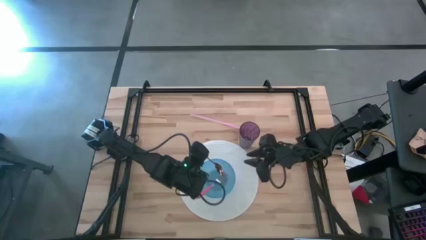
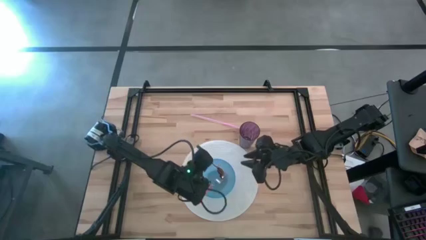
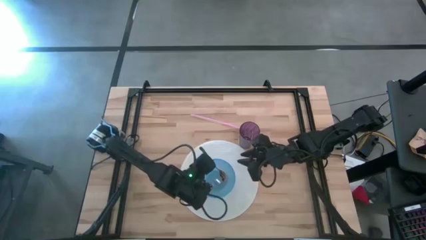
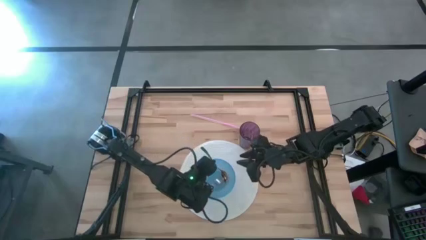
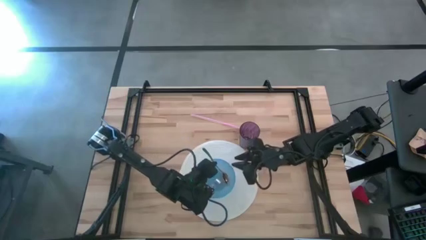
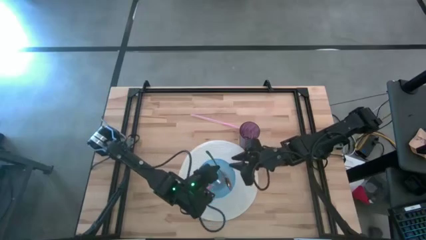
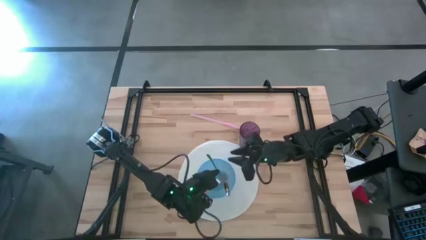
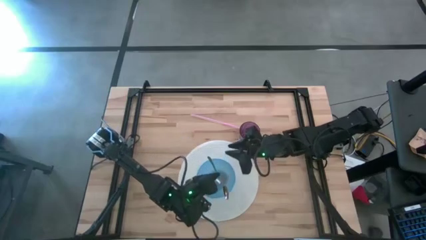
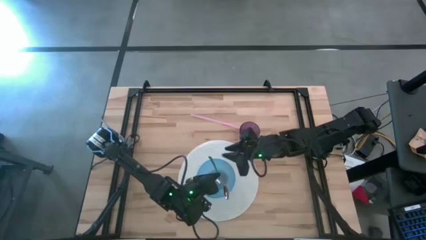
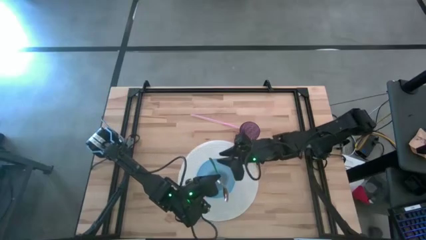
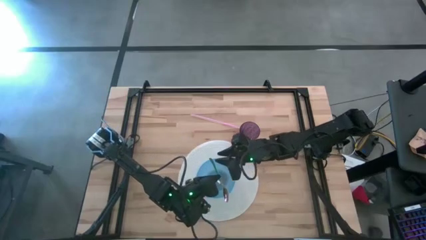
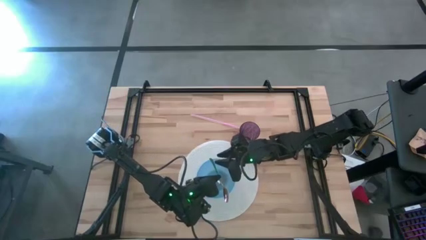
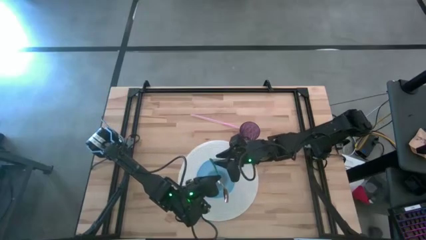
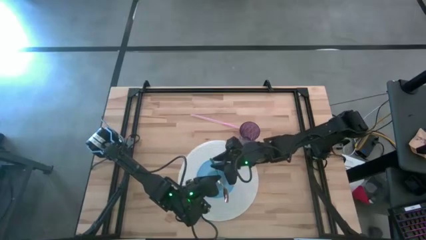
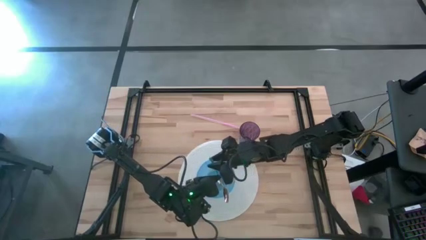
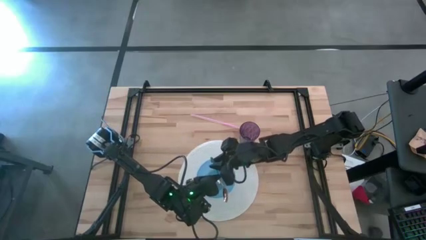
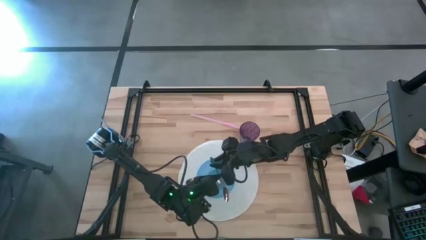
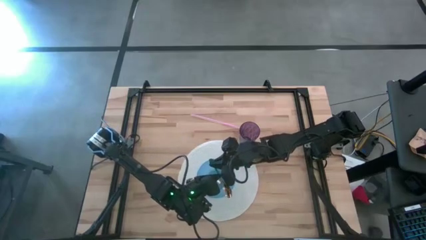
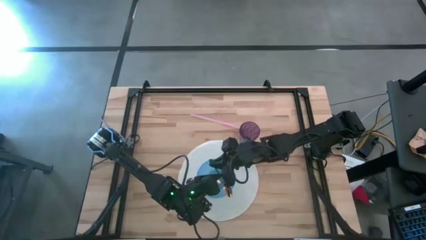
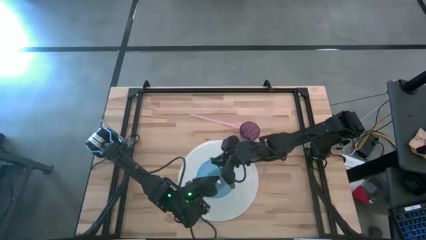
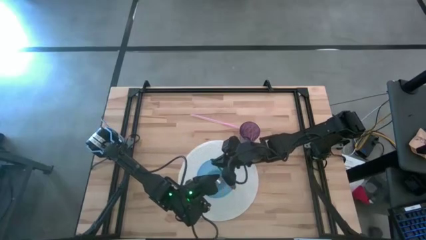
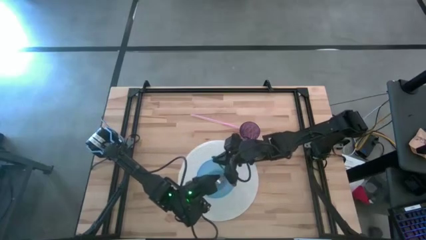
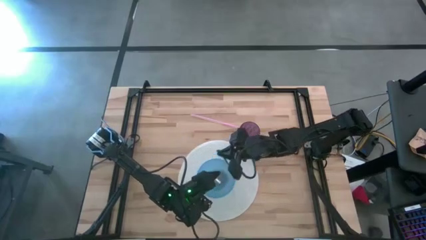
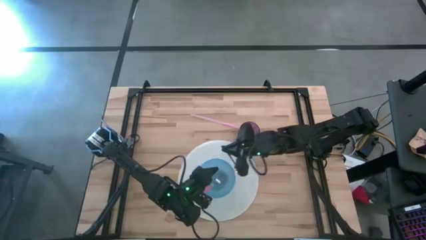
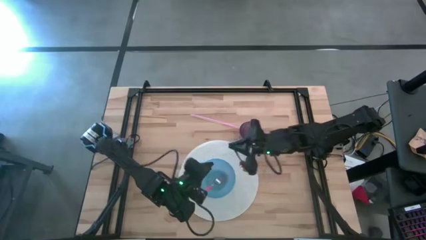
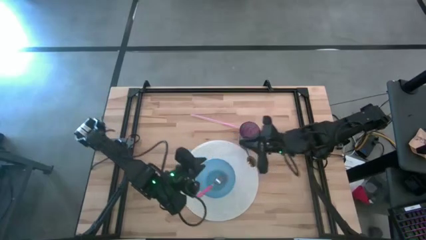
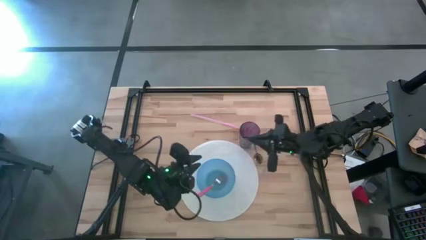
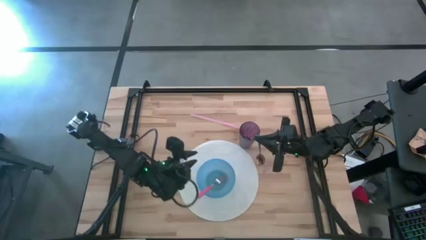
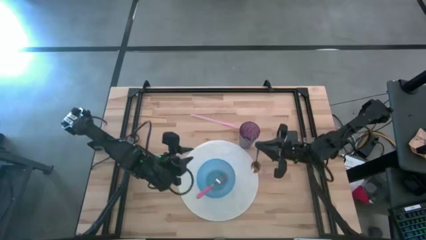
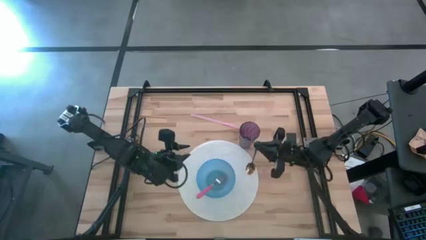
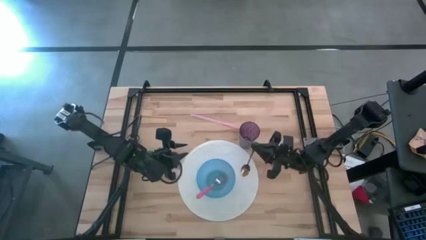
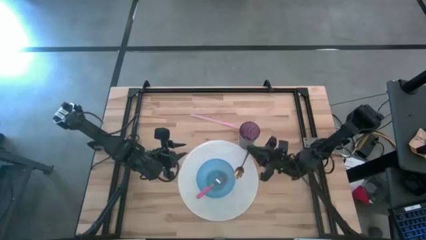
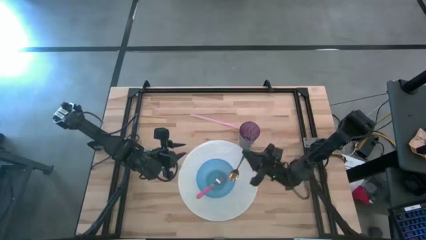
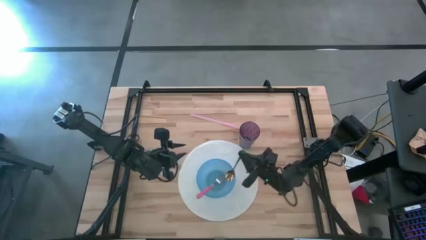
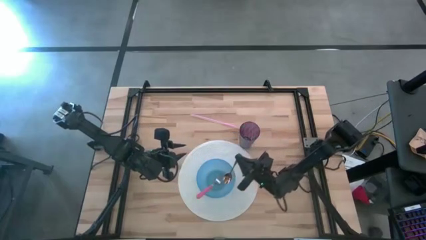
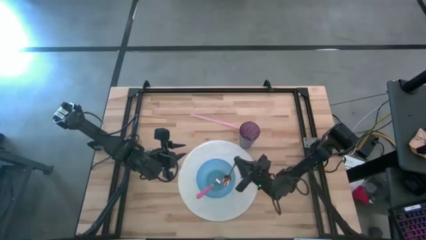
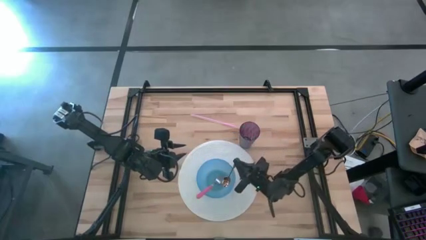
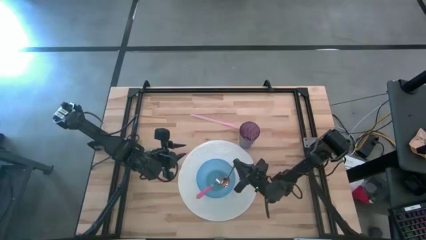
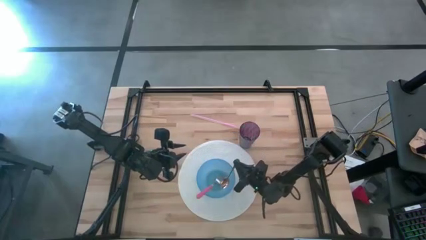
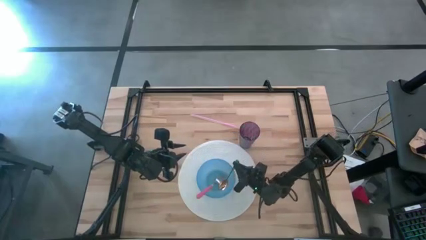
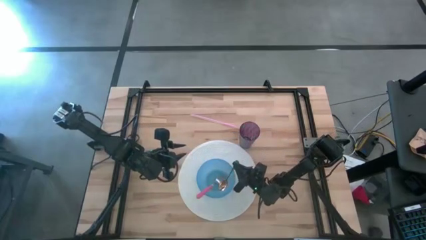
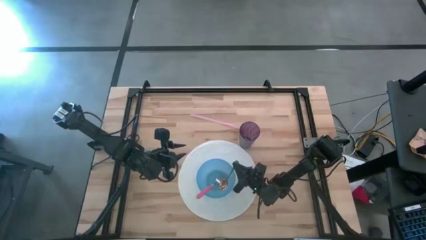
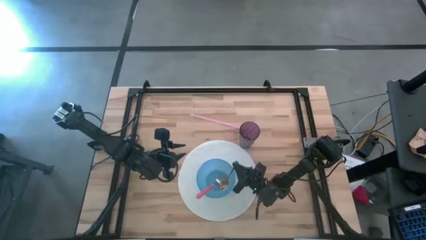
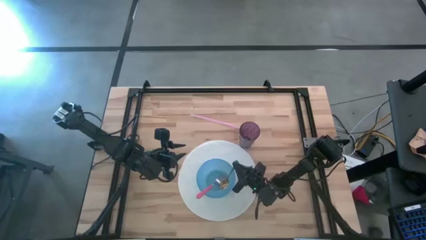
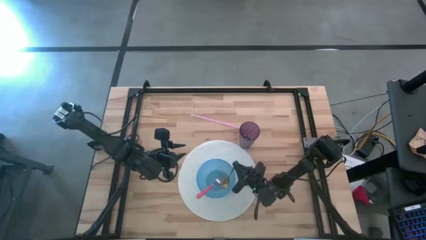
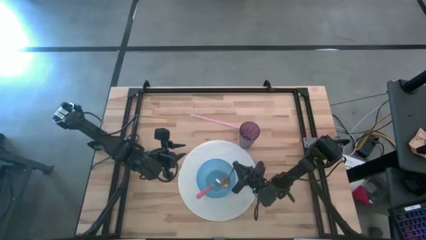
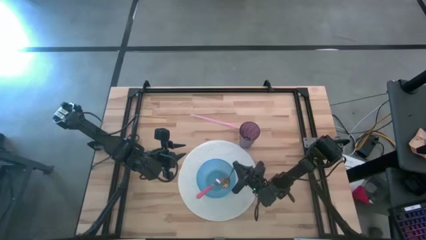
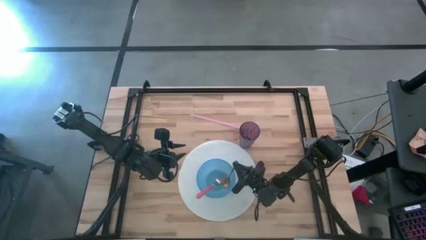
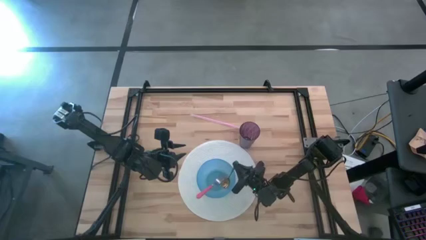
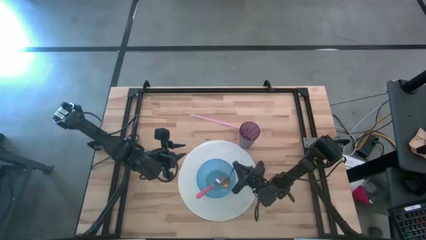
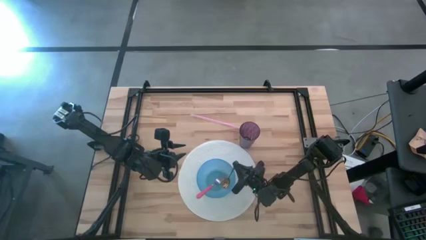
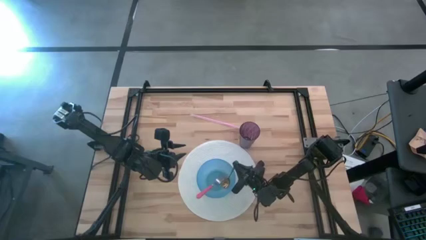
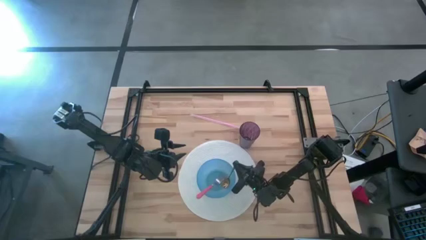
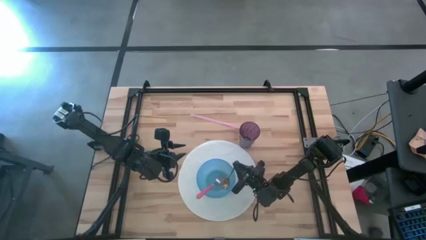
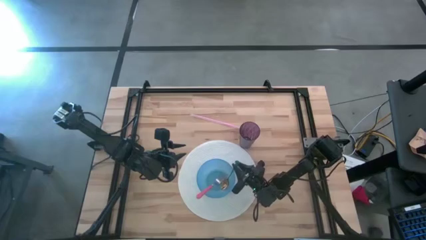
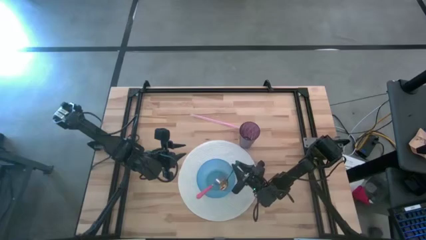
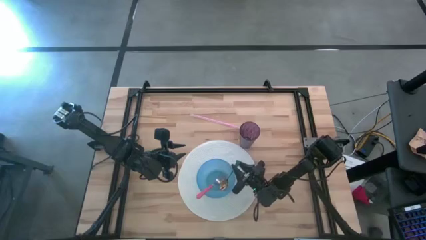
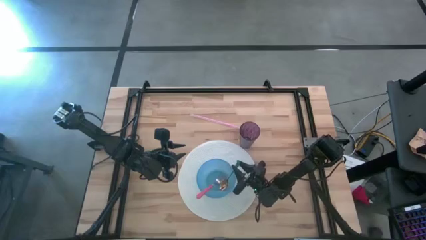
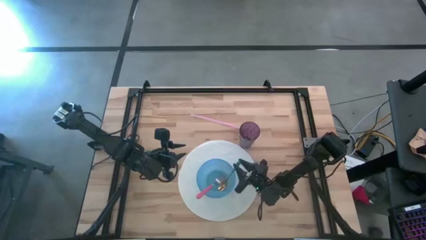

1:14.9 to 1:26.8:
Task: Pick & Place Utensil
Put the green spoon in the blue bowl

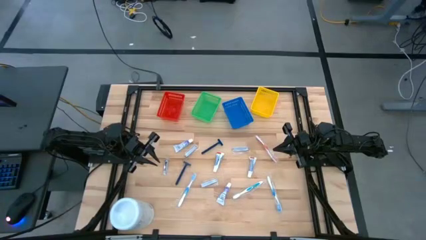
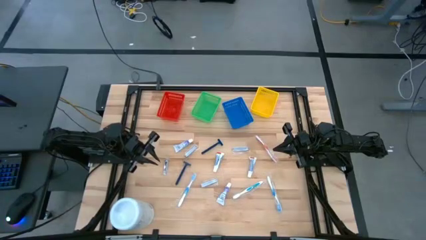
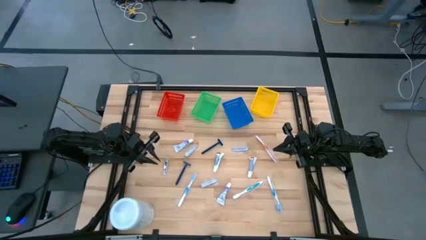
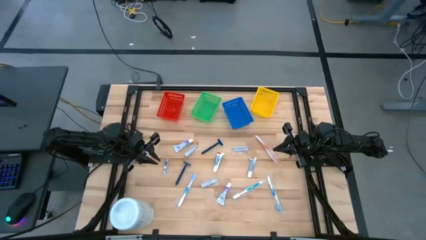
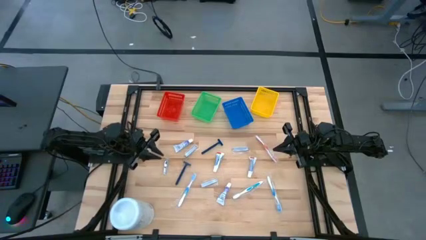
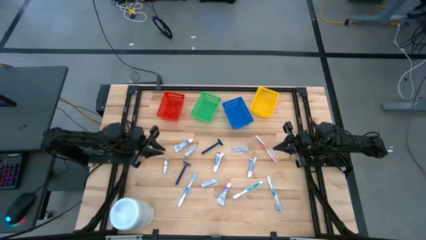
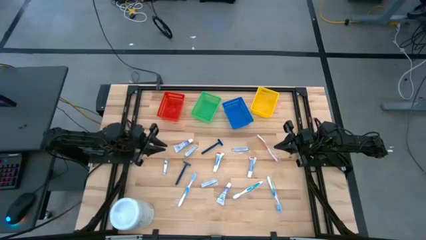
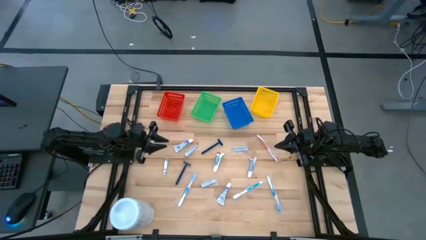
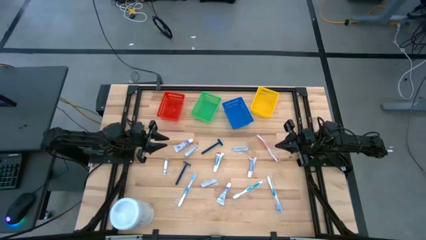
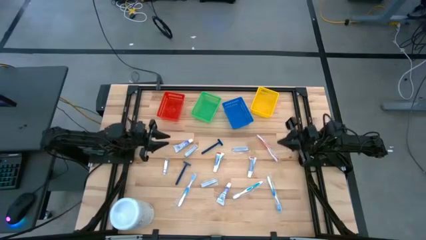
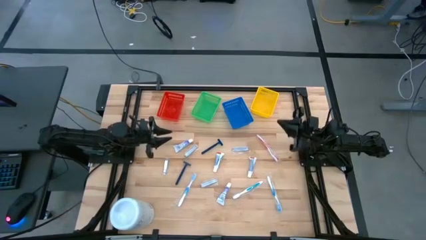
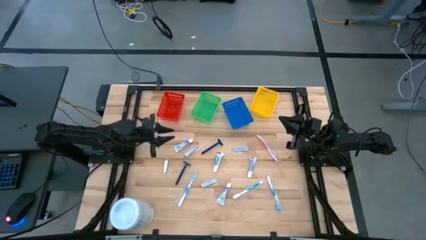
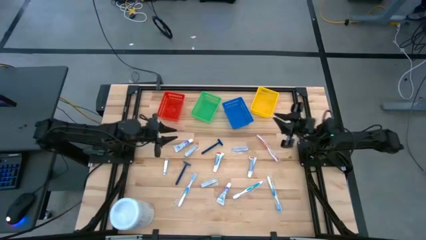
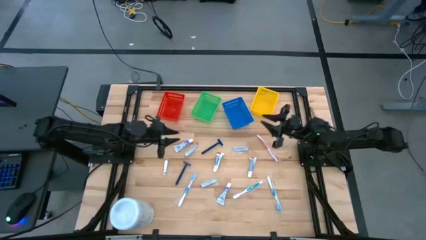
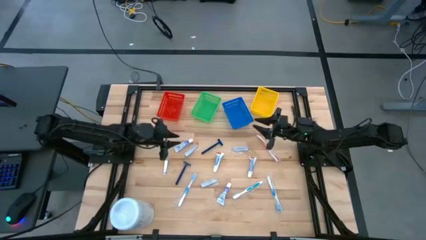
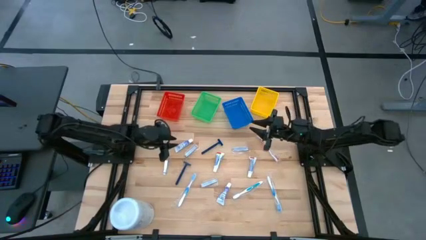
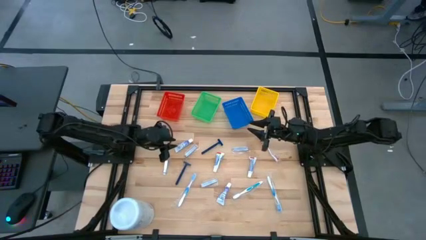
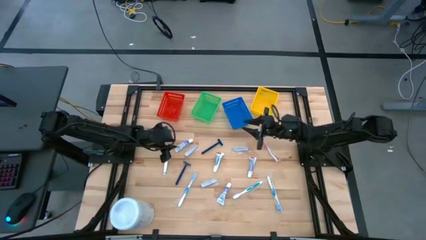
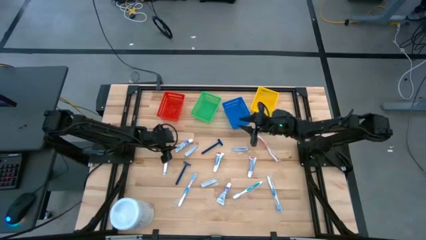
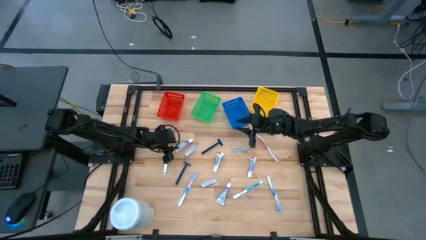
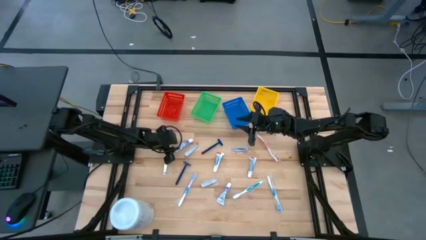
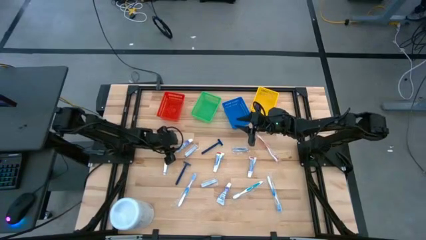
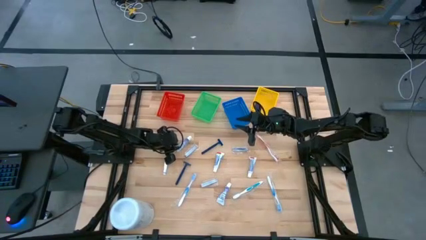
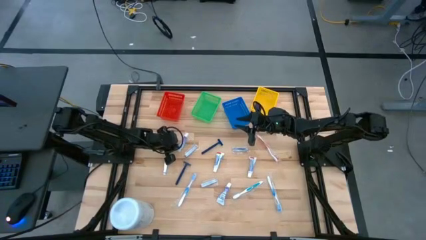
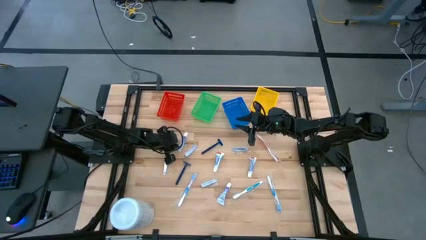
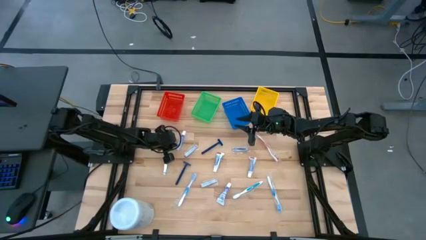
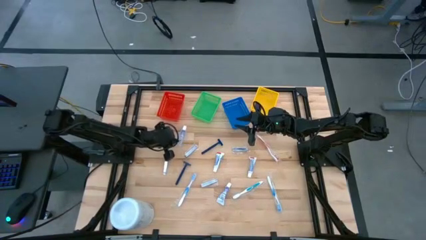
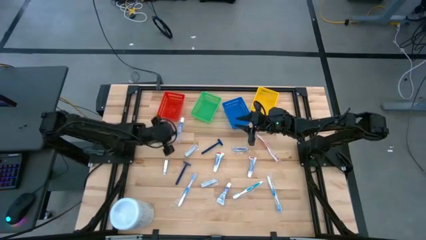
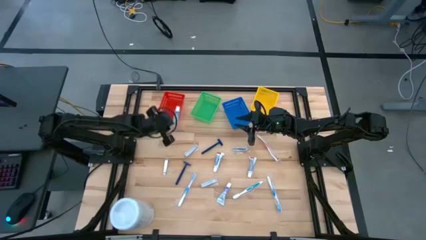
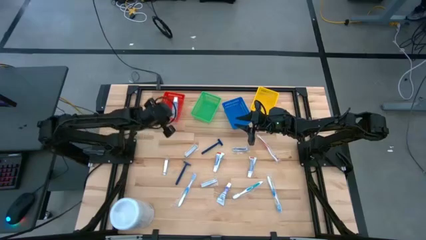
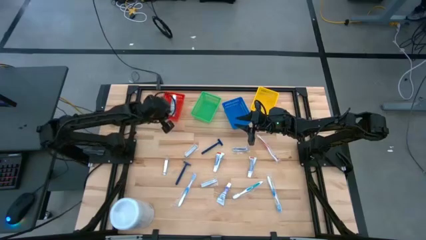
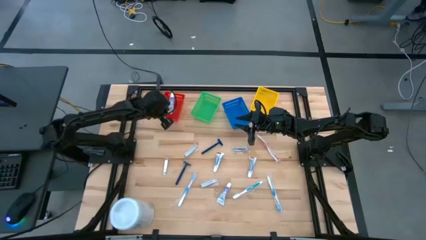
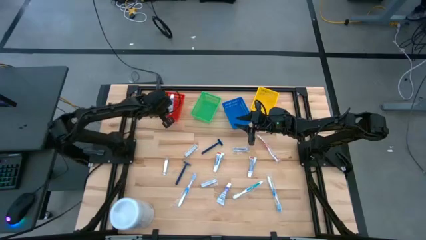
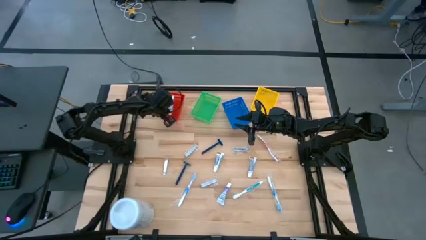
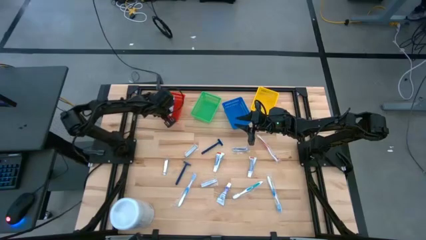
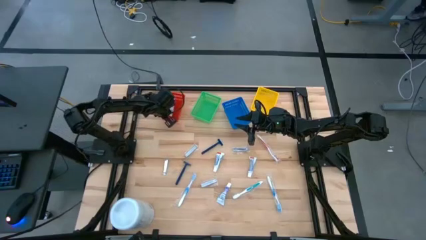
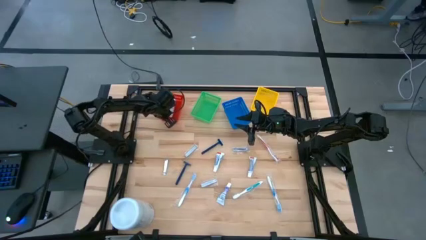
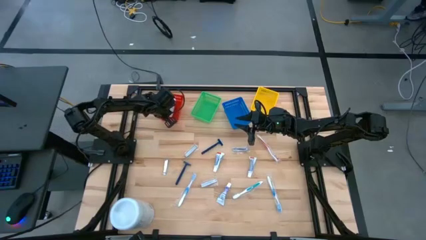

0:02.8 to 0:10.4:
Task: Pick & Place Travel size toiletries
Put the white toothpaste in the red bin
